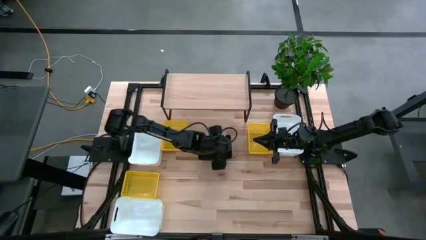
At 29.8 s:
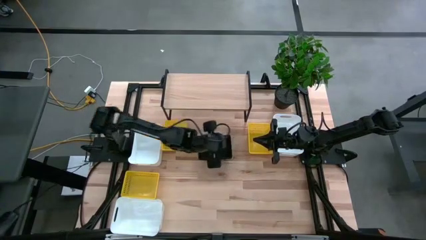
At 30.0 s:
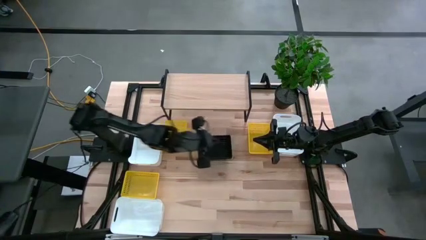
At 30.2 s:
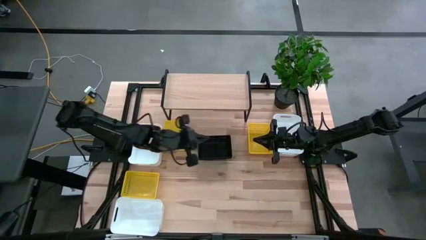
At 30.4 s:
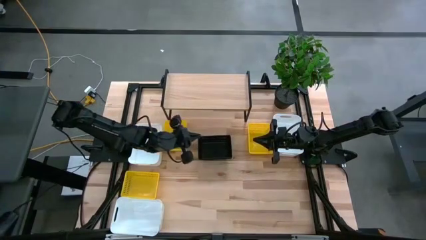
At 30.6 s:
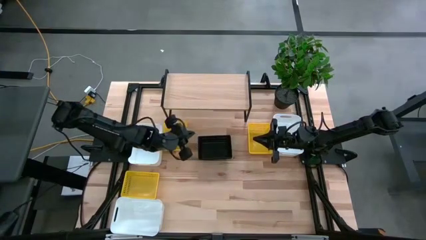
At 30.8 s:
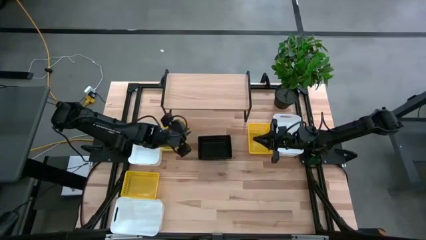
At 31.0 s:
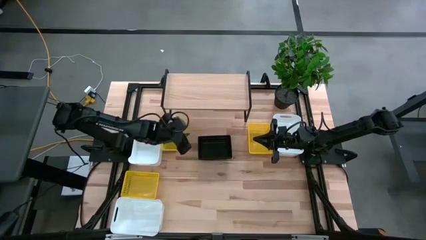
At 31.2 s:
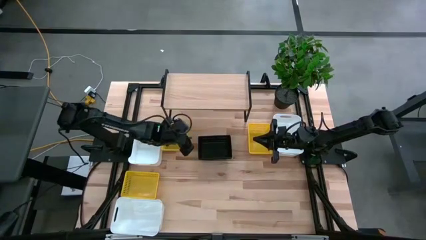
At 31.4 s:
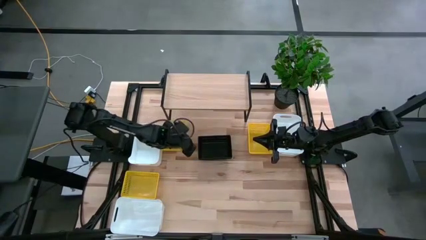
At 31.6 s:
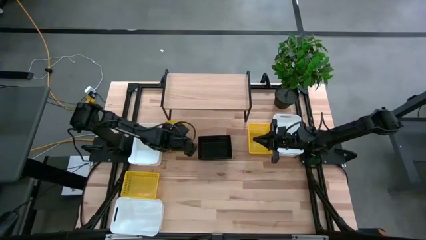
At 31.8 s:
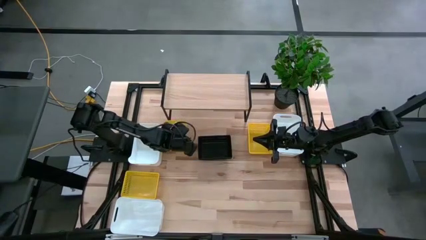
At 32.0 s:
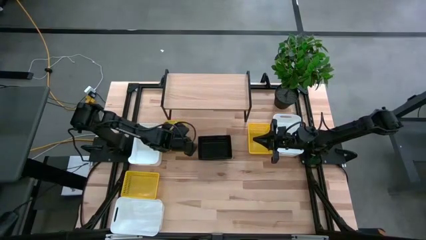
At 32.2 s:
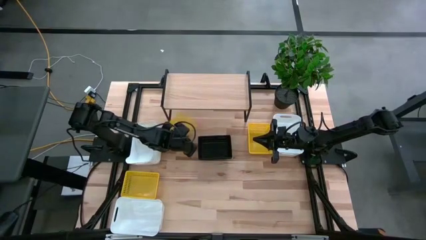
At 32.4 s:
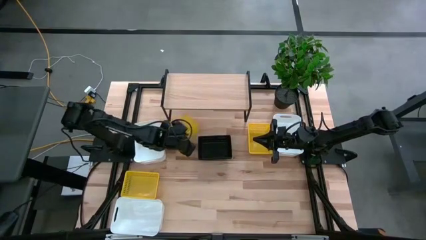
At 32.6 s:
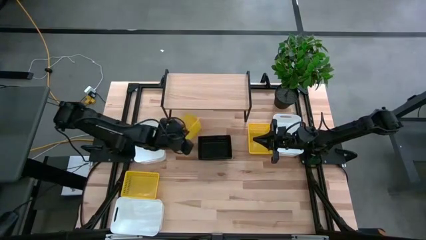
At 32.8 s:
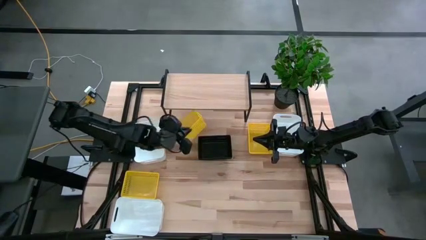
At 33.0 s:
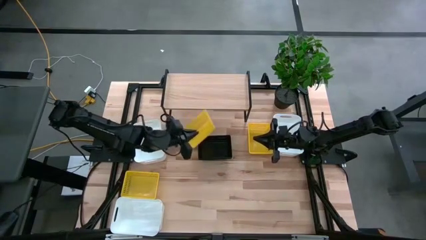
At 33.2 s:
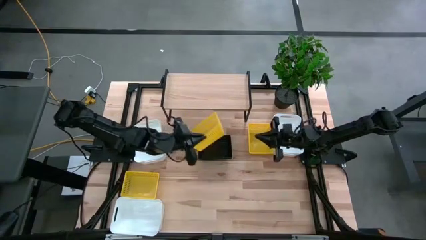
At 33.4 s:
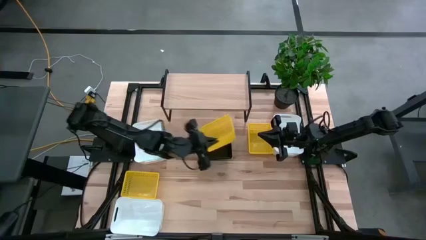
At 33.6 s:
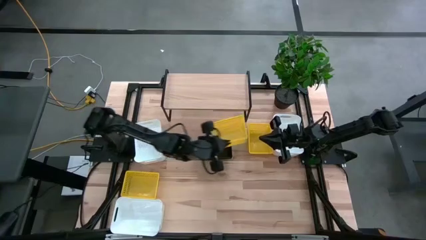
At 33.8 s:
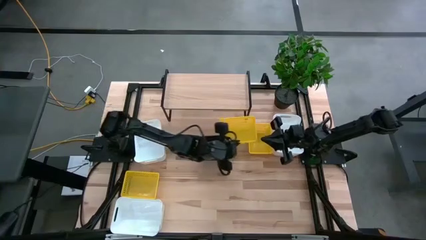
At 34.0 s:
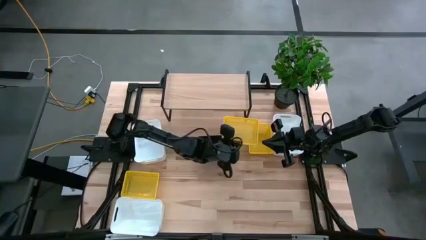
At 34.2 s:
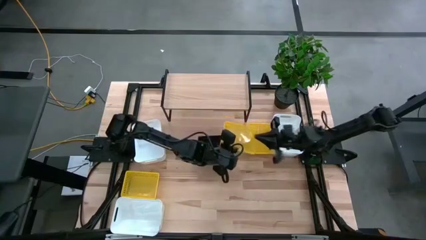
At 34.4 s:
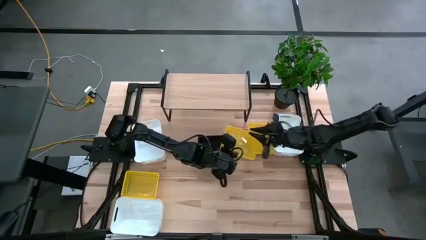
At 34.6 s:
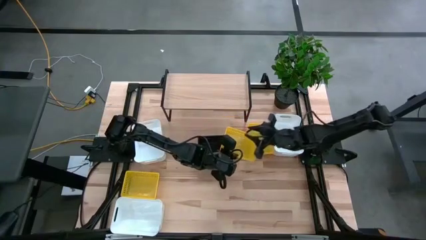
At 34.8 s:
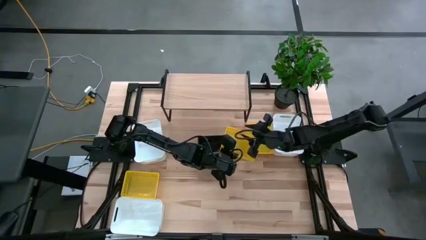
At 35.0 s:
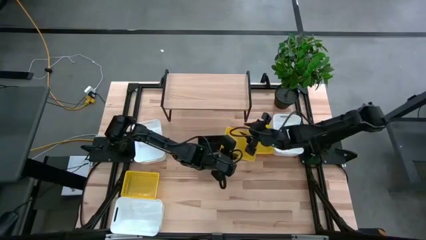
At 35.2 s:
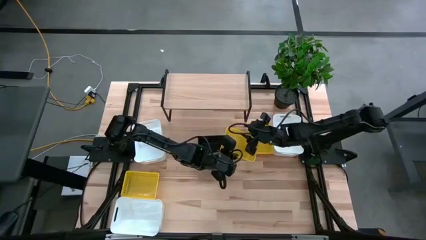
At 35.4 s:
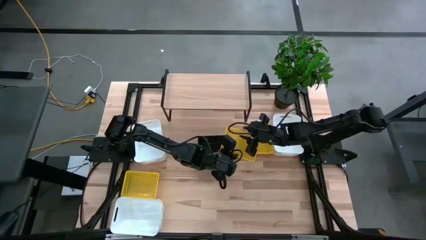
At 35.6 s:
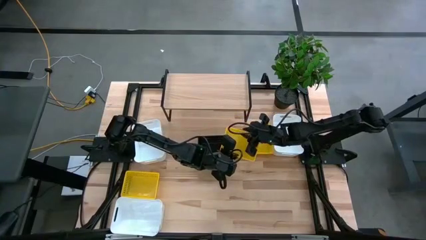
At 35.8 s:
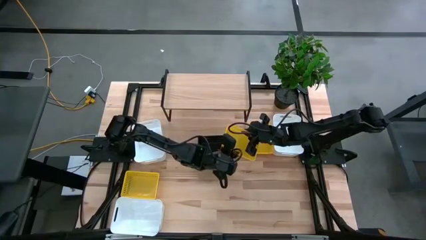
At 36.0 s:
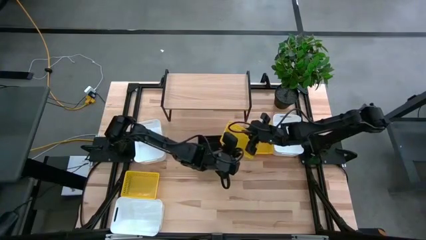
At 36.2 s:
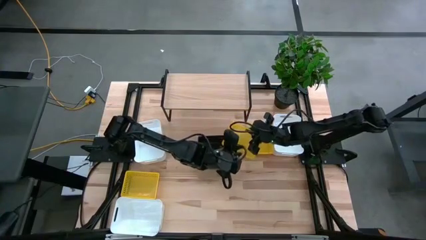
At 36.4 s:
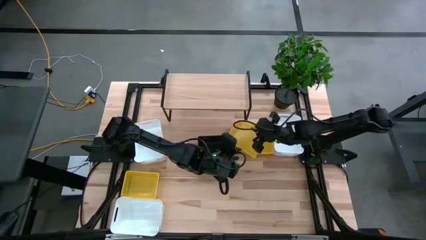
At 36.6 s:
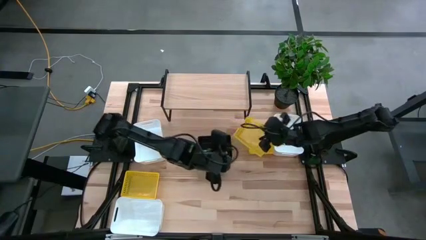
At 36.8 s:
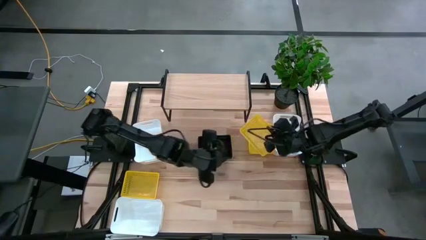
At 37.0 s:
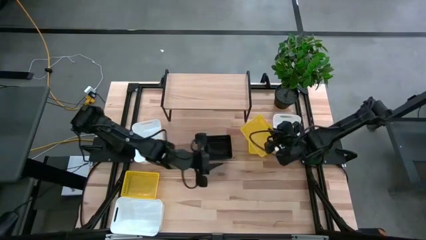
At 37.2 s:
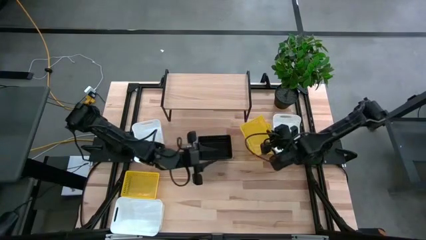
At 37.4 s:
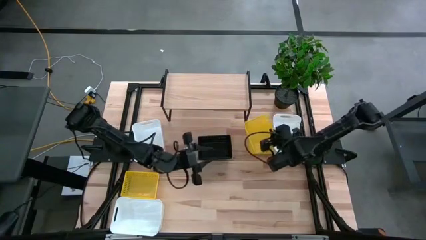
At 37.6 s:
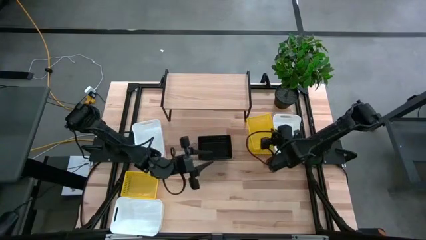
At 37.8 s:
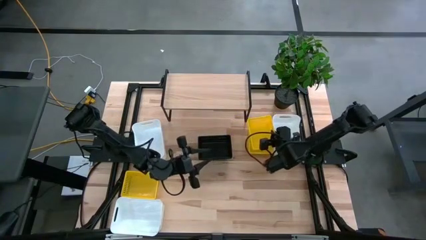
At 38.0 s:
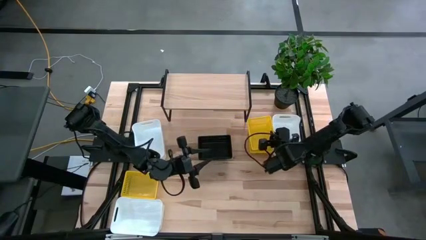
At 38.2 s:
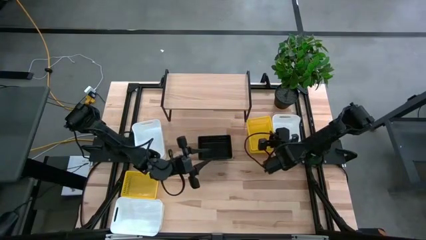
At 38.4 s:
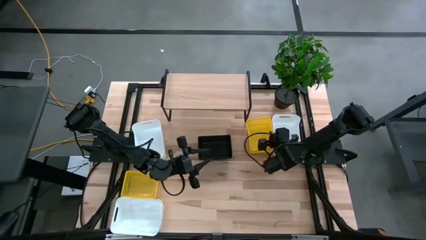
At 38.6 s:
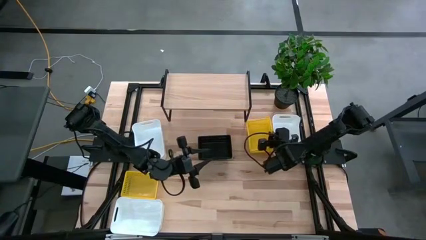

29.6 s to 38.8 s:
Task: Stack baskets on shelf by color
Stack the top left yellow bin on the top right yellow bin
